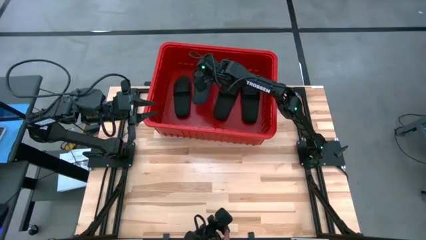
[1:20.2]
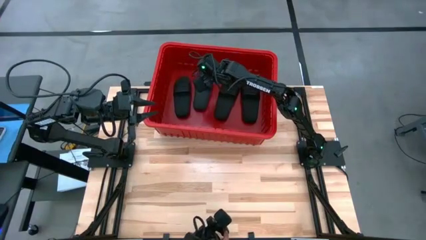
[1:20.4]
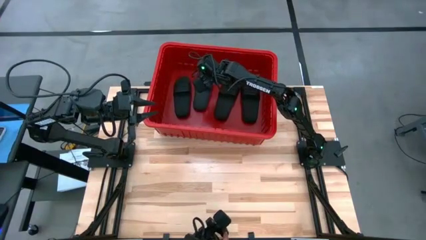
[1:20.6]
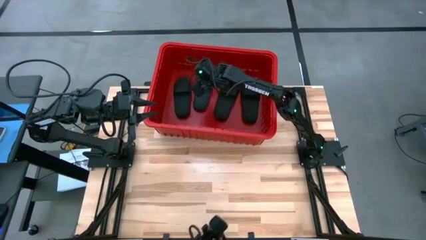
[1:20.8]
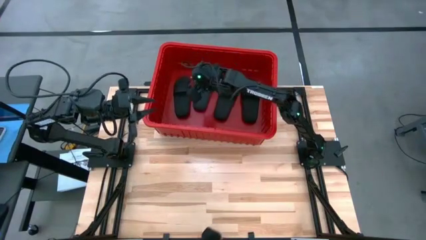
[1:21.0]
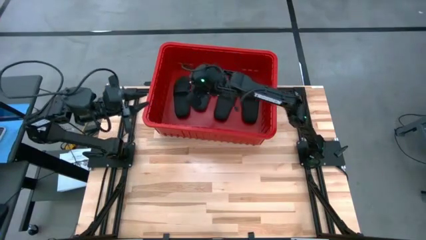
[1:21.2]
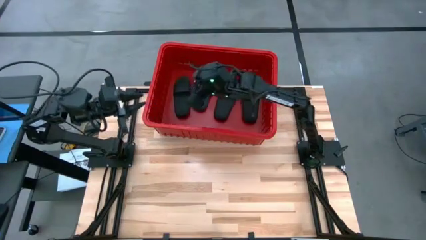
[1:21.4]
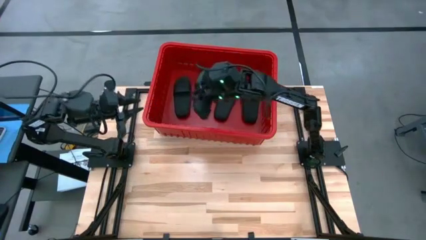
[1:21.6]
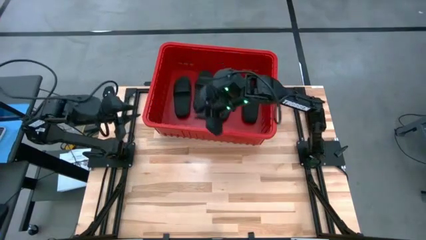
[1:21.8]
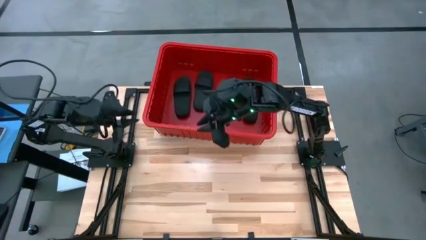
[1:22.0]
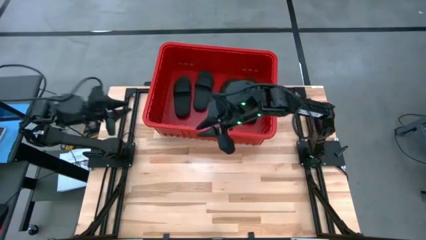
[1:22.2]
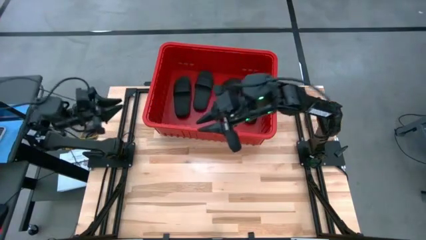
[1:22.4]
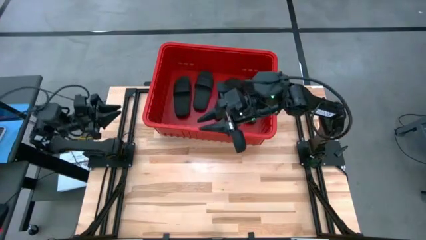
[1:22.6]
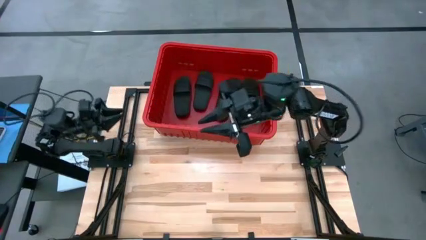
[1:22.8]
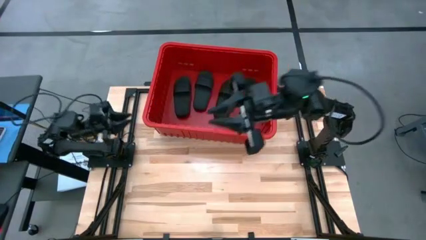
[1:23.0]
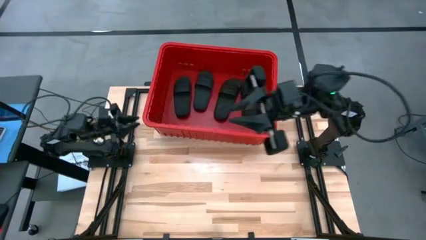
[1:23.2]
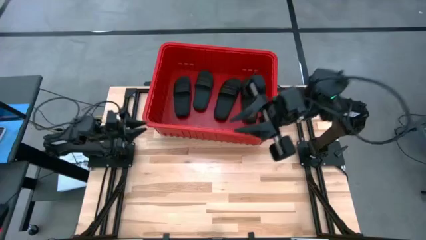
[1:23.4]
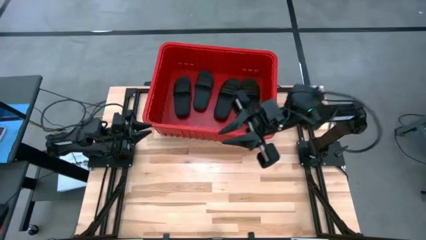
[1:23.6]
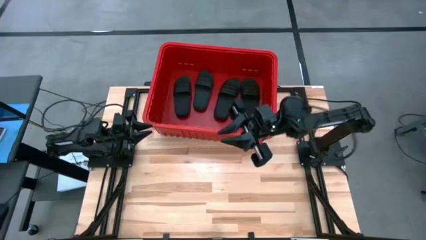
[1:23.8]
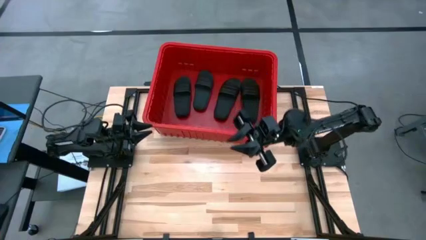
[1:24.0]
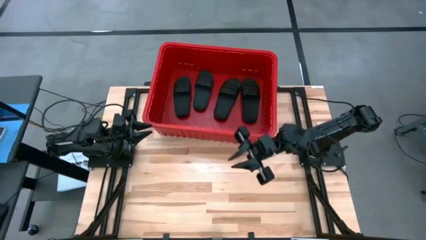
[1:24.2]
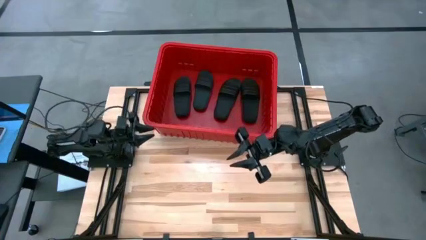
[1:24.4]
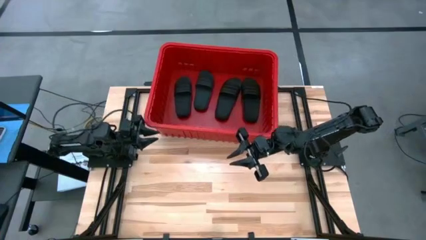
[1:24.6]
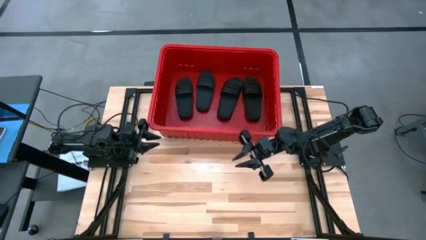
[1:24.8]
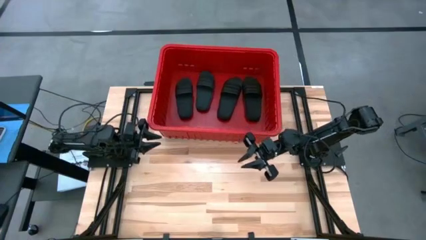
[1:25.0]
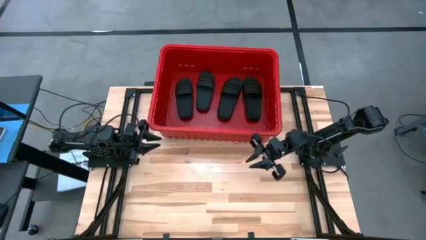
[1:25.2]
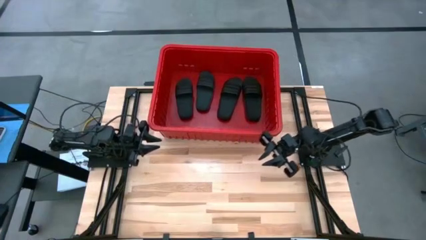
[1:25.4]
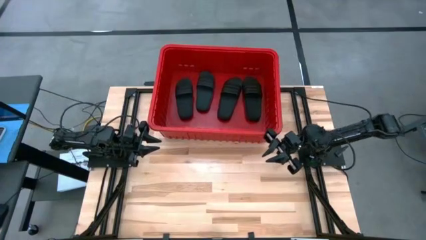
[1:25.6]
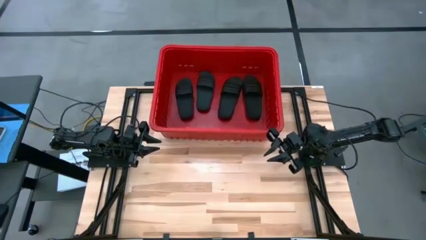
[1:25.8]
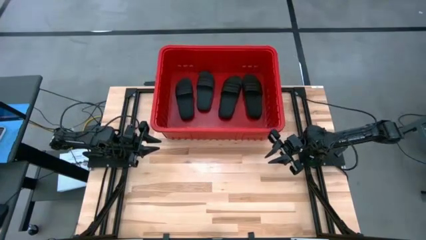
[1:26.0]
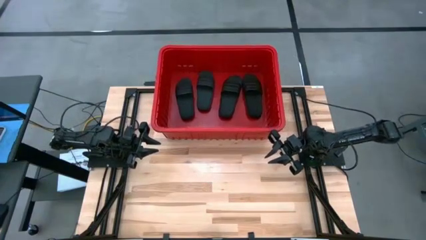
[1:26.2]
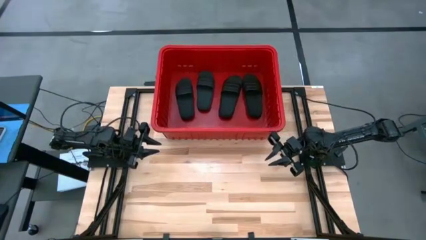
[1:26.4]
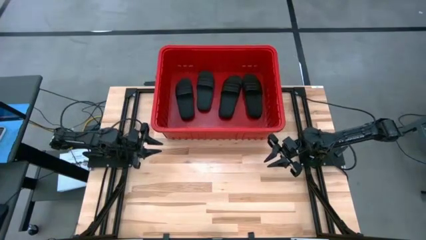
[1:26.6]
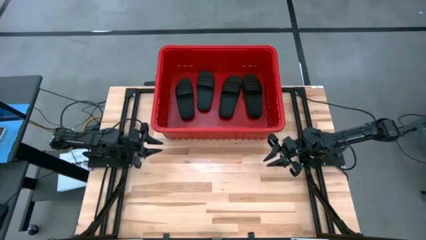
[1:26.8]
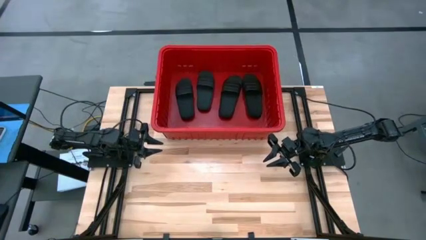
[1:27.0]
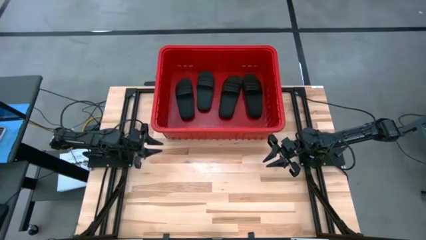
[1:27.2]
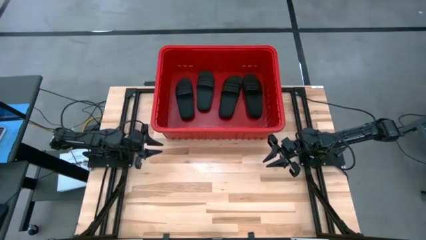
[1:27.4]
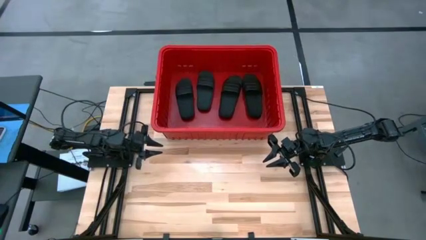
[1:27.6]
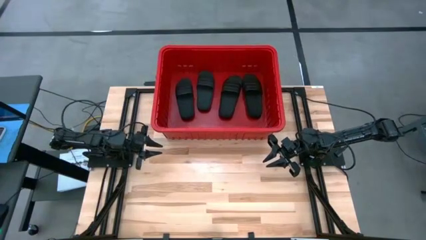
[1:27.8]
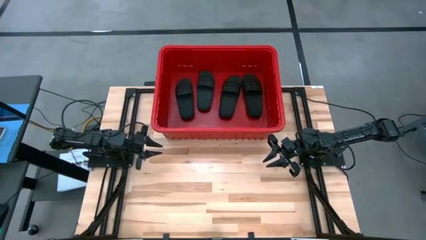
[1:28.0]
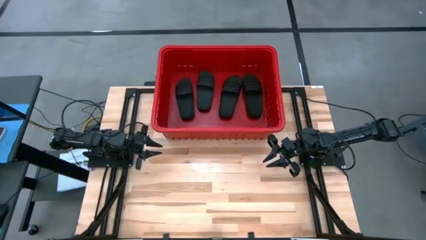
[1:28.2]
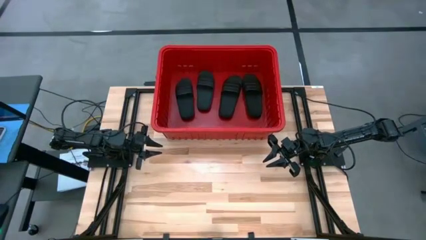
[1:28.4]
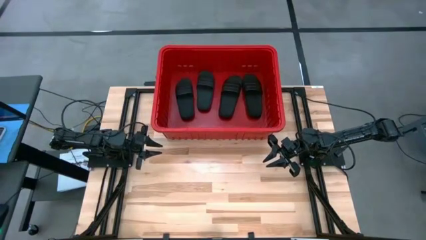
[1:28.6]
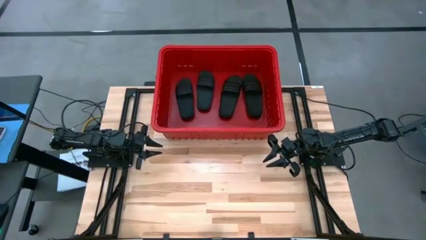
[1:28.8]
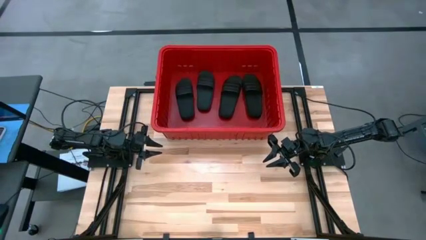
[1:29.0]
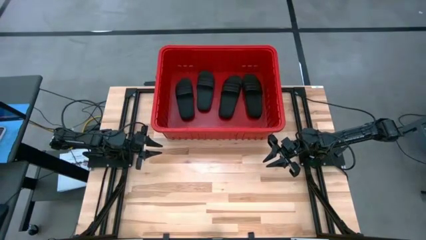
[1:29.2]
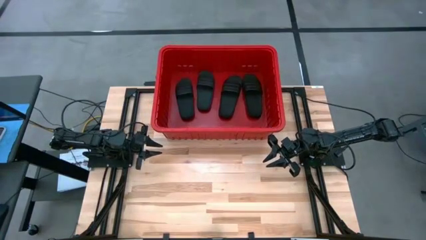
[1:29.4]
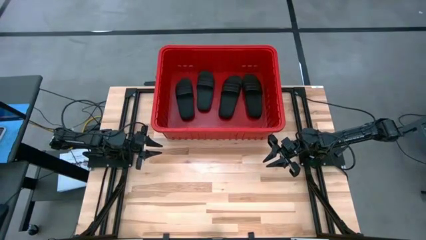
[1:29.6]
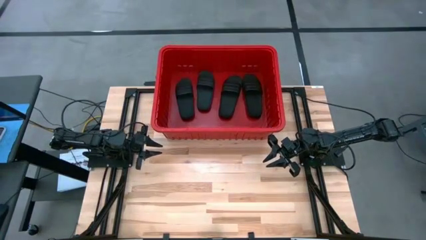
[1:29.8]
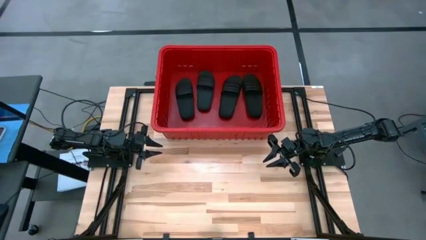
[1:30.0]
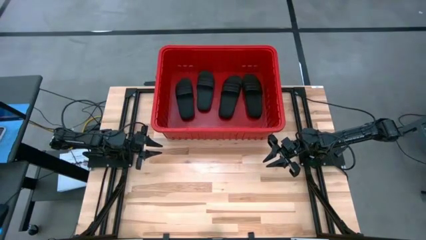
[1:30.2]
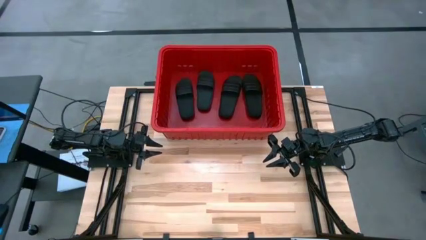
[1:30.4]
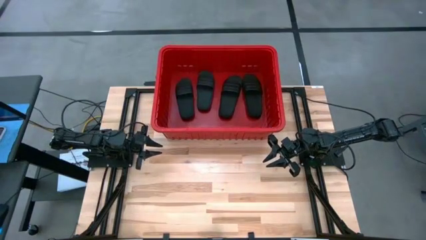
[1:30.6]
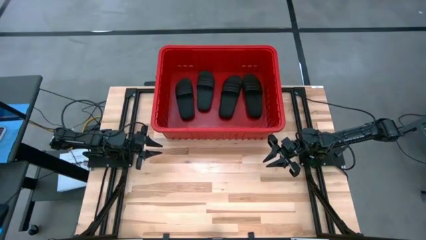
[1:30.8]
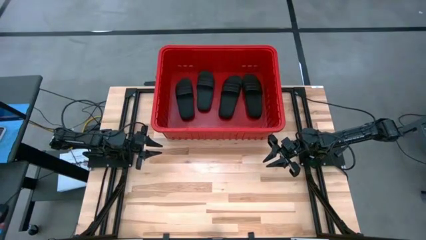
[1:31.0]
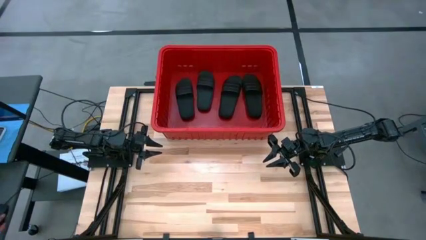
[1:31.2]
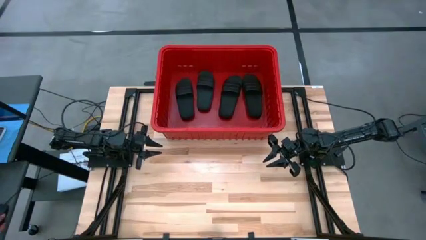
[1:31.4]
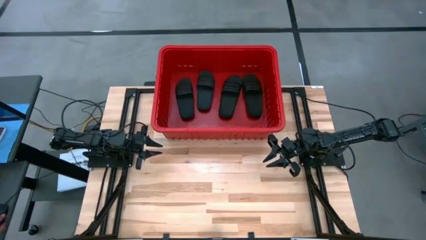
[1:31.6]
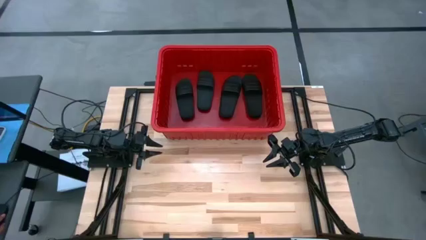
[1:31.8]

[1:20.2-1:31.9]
Task: Pick and place slides into bin
Return to Home Position

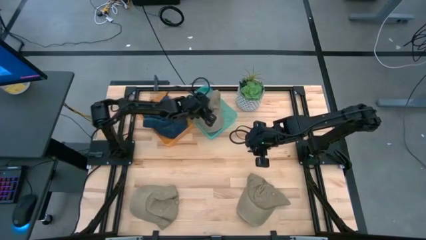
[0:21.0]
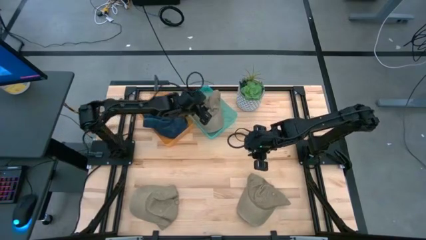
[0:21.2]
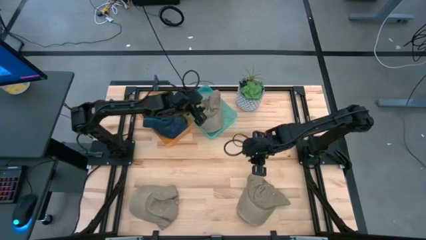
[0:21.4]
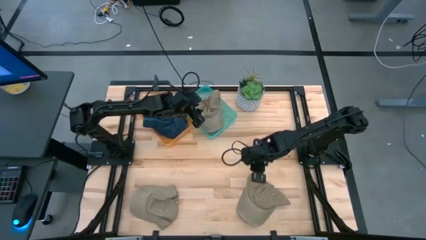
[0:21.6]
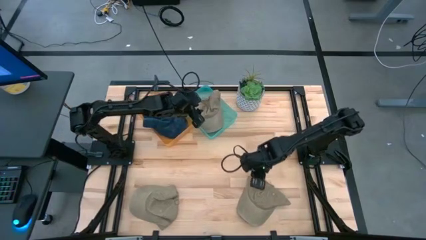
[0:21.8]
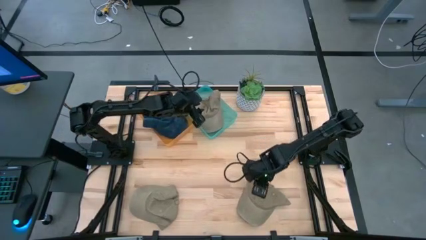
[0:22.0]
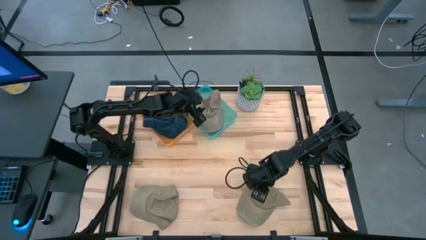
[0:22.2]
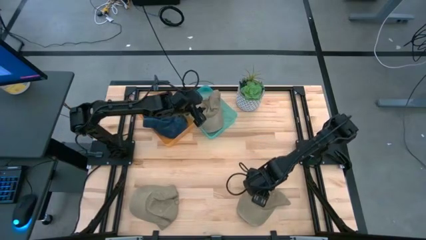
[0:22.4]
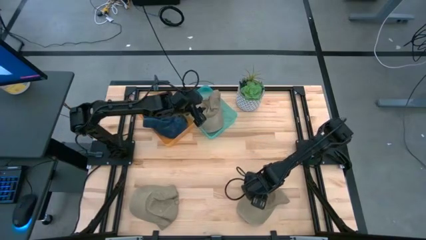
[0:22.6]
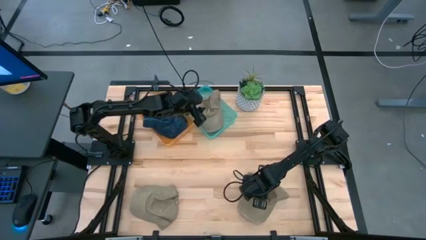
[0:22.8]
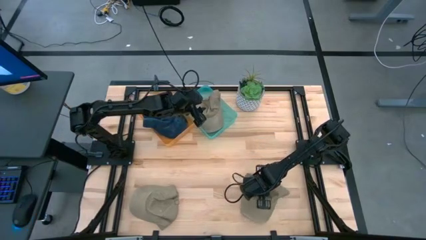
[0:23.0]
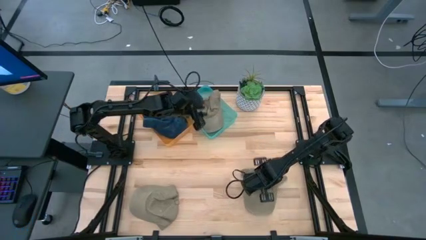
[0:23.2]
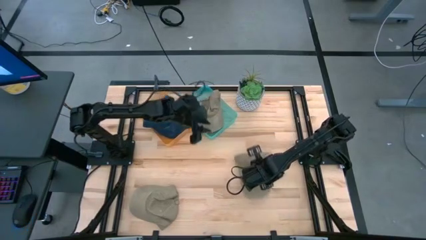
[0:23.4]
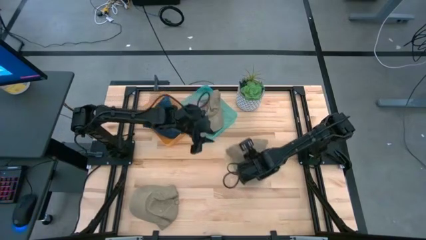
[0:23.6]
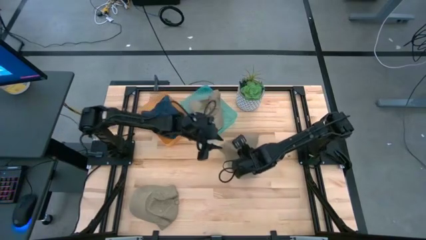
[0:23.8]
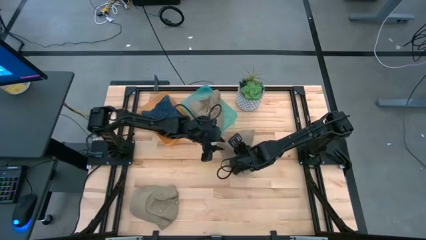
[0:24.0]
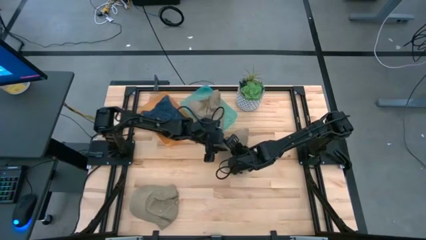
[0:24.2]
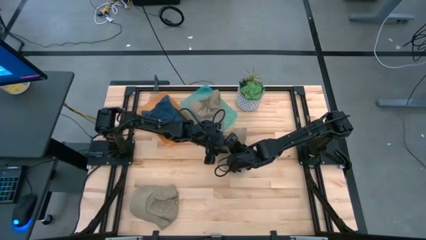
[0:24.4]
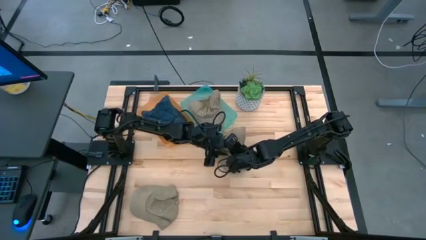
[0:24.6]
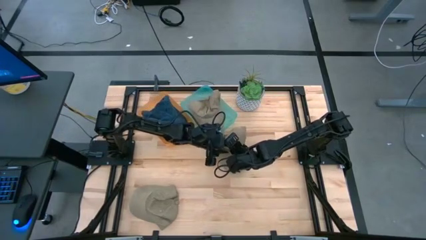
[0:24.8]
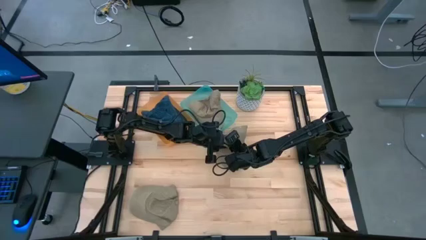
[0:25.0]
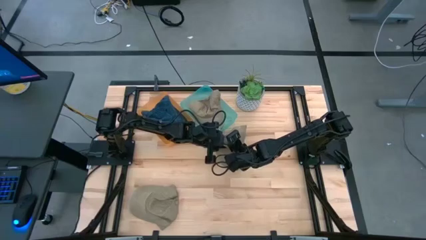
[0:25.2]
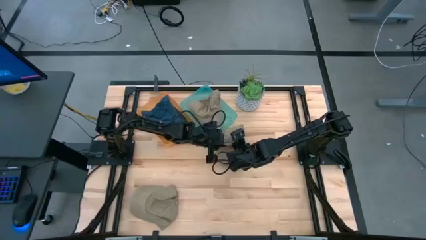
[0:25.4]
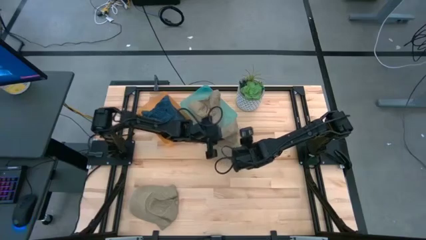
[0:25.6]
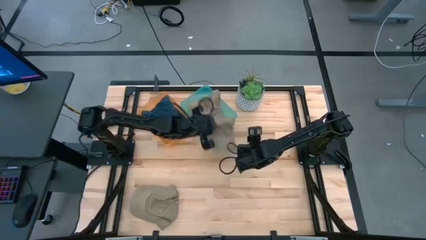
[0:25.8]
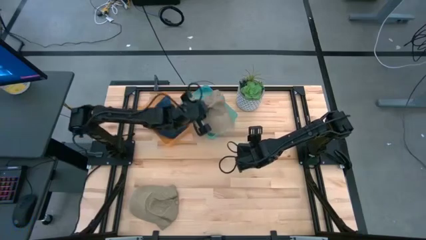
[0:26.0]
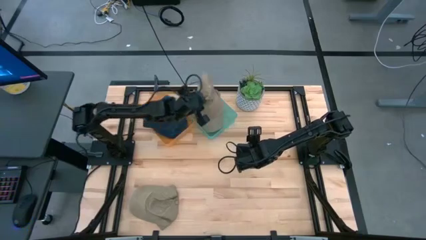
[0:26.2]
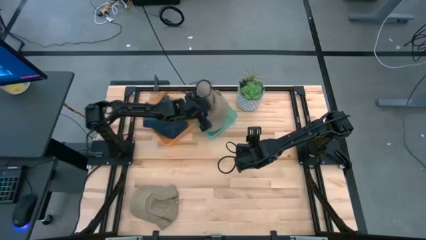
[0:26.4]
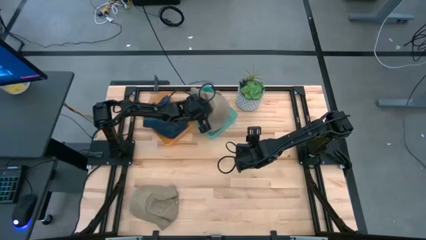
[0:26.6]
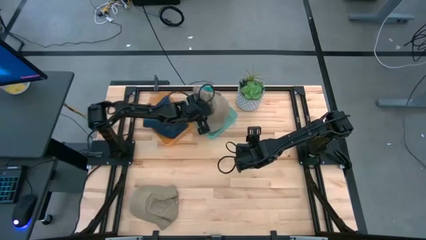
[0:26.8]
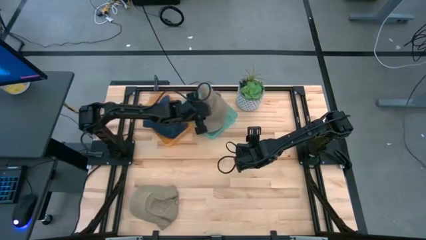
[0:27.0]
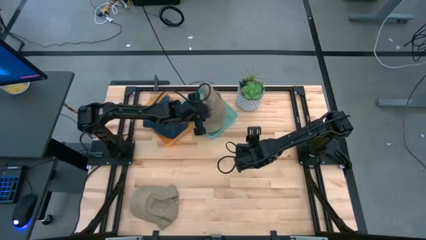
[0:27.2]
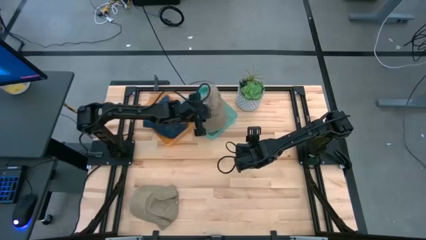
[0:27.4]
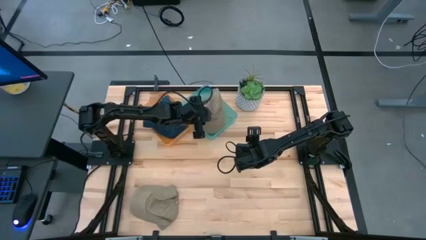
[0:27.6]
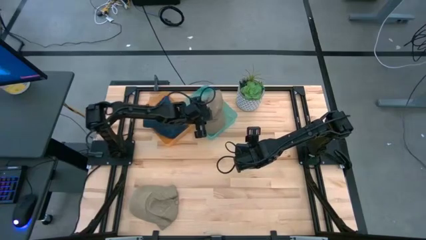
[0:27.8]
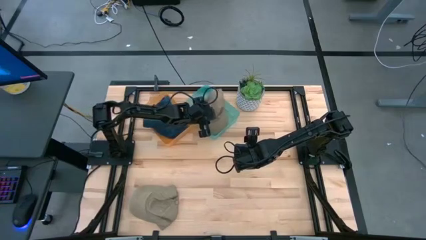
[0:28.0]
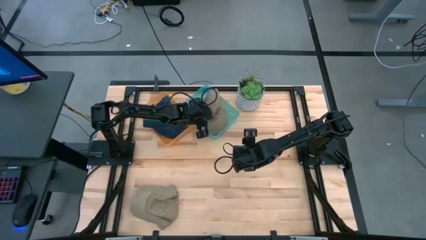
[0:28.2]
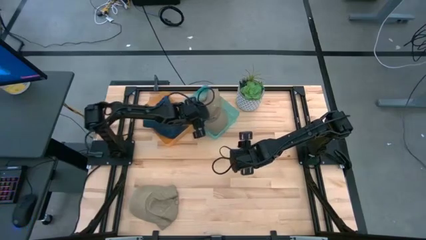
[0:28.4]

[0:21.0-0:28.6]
Task: Pick & Place hat
Put the right brown cap into the blue bin
